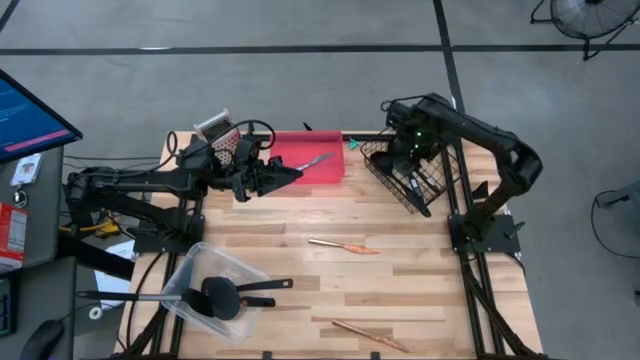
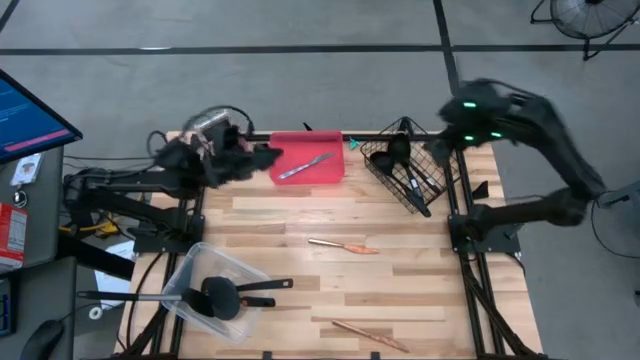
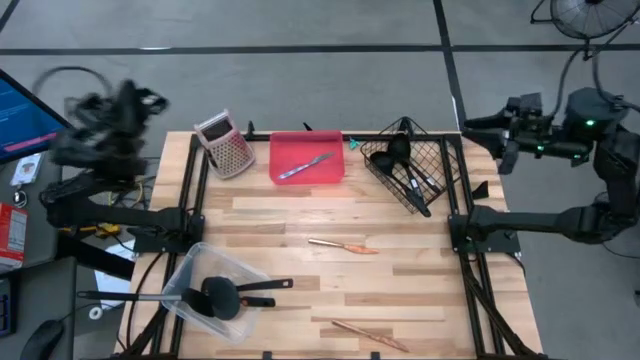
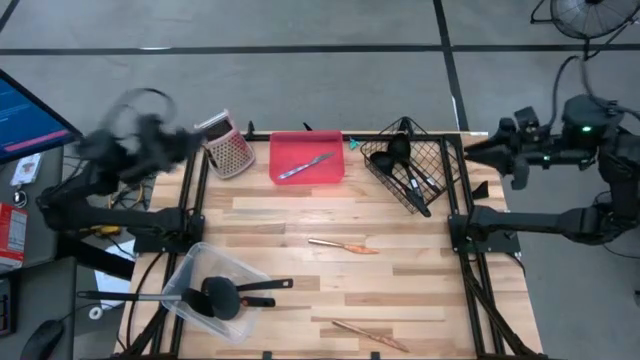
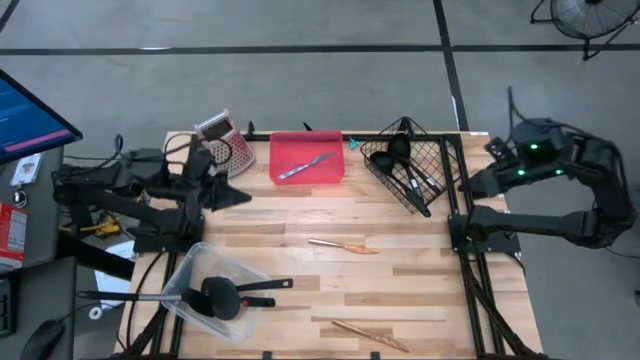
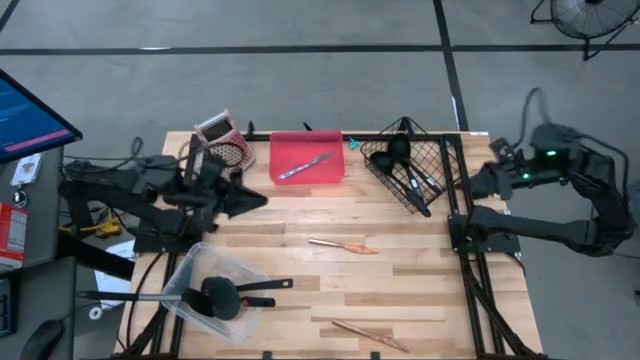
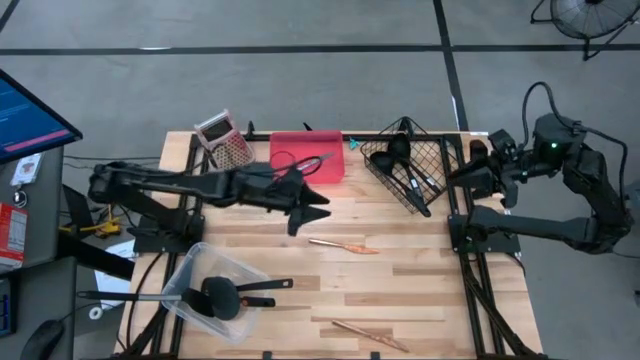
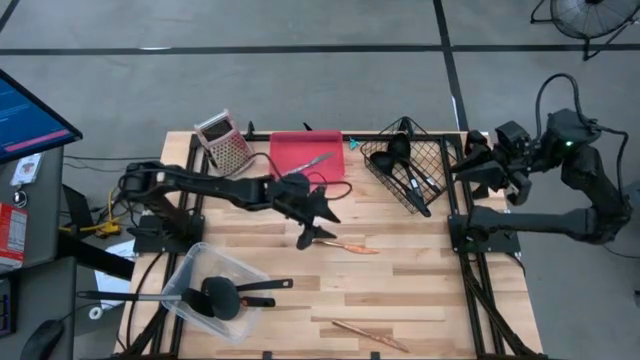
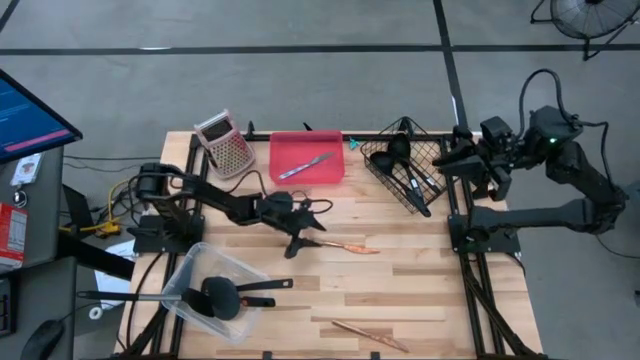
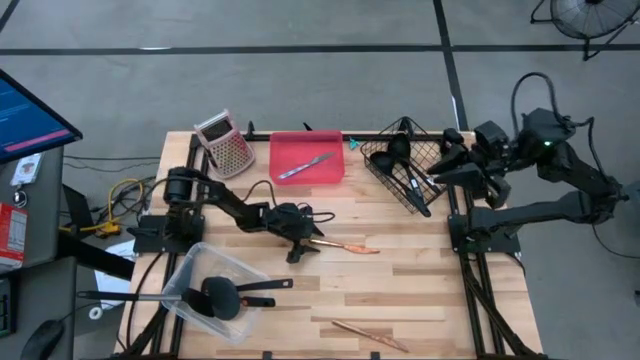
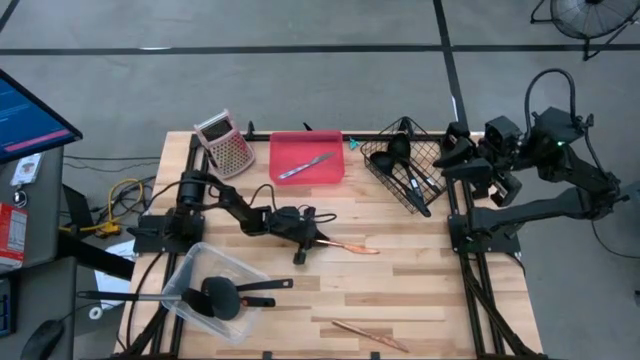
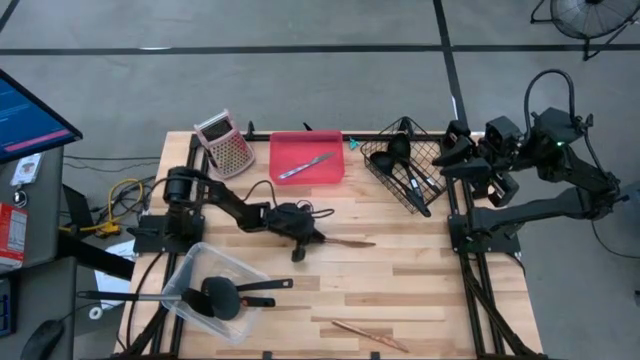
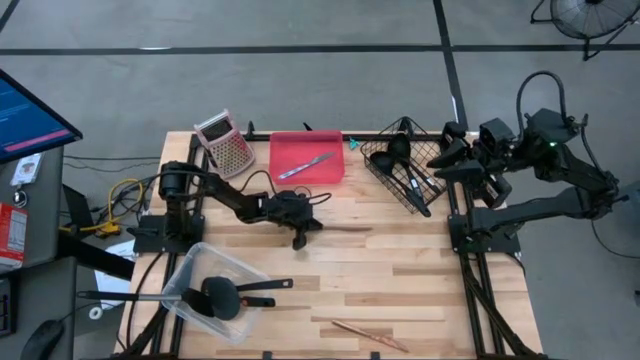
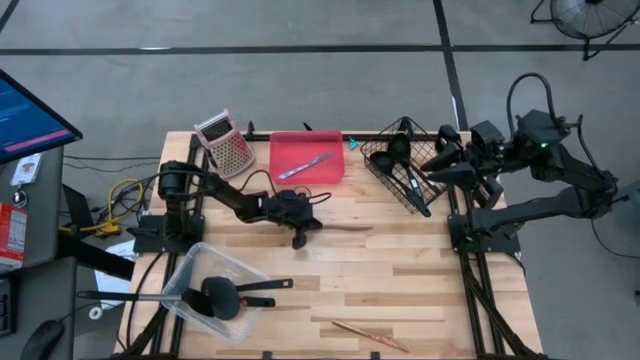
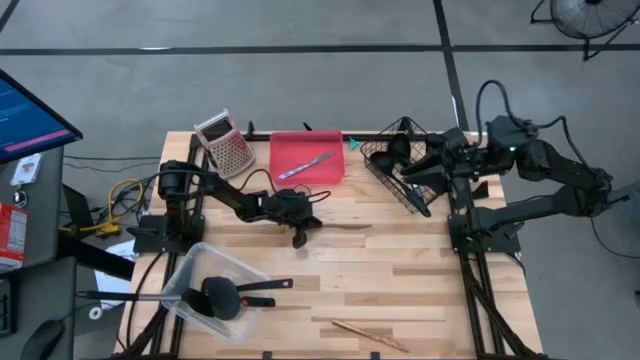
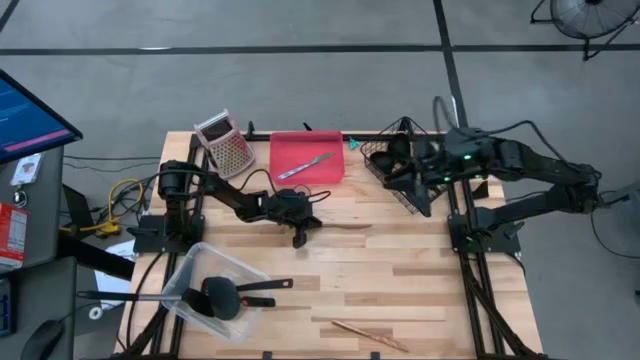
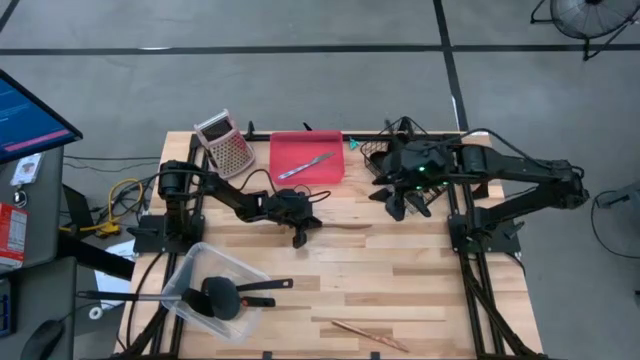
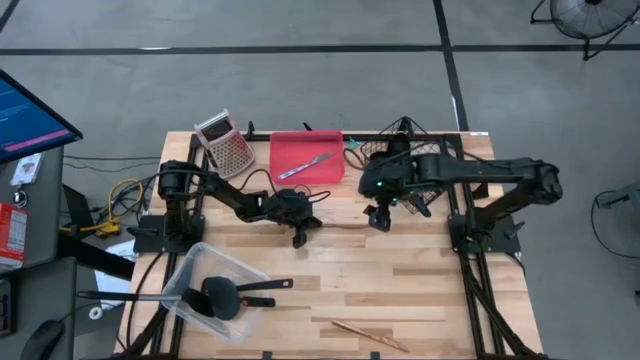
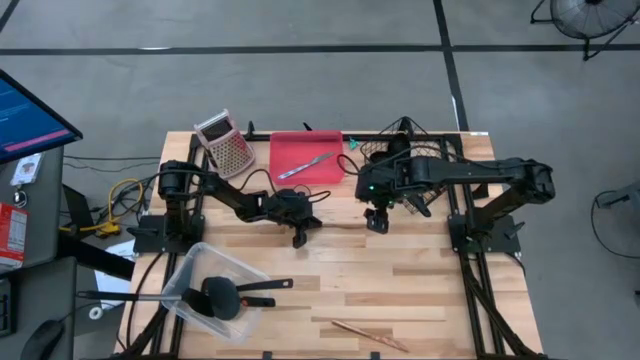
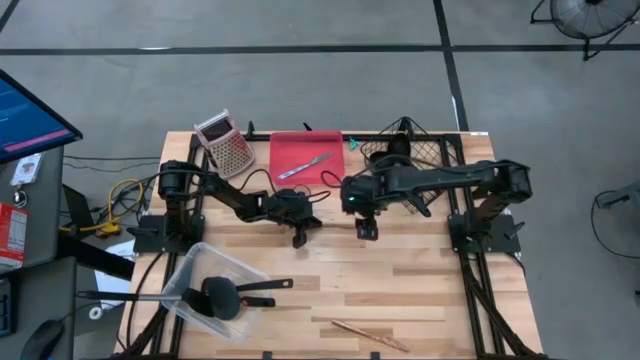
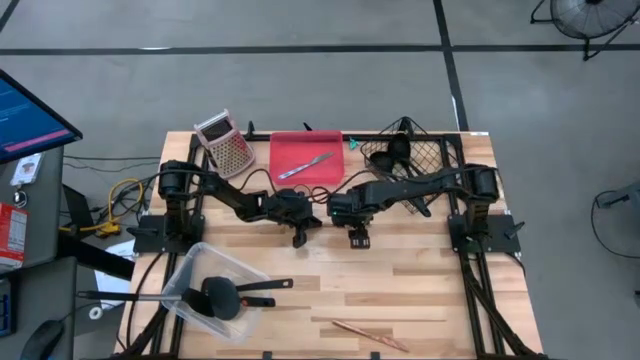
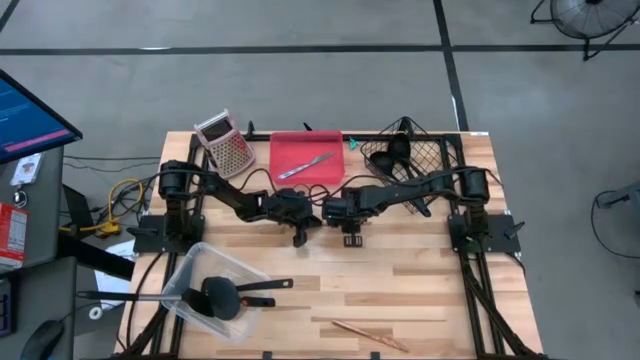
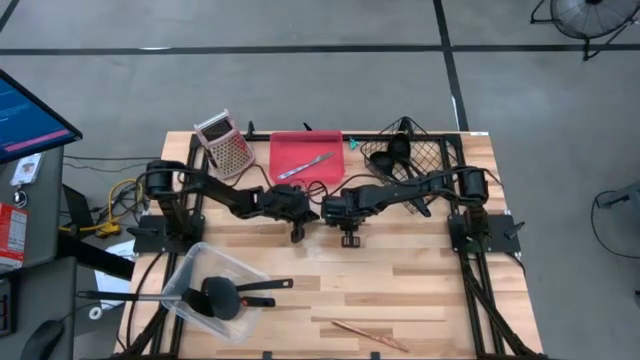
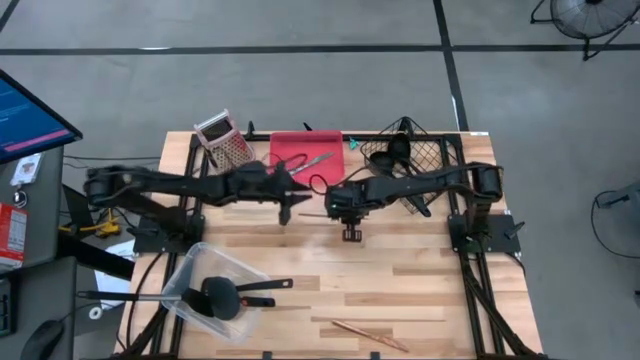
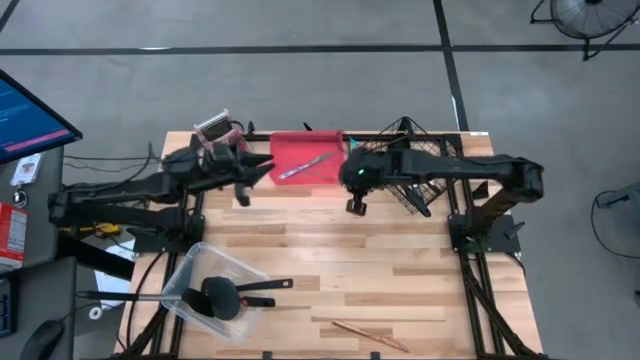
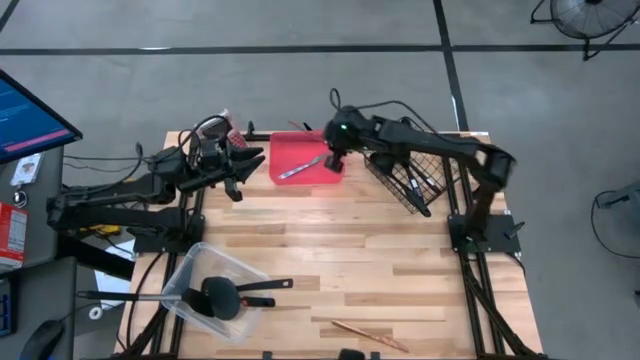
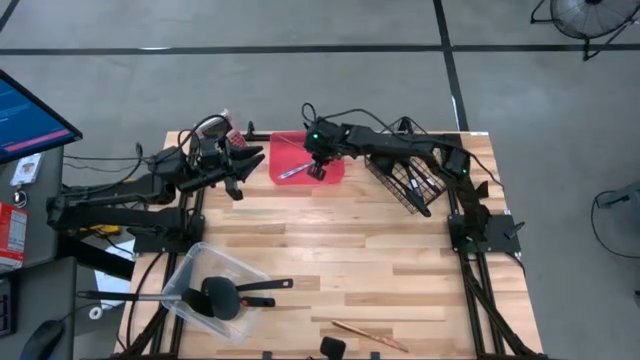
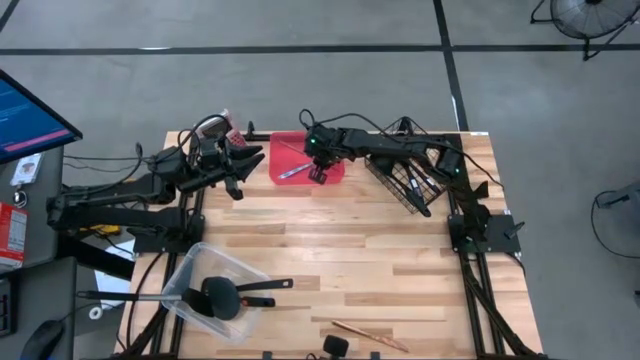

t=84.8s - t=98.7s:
Task: Pick & Place Kitchen Items
Put the gold table knife into the pink bin

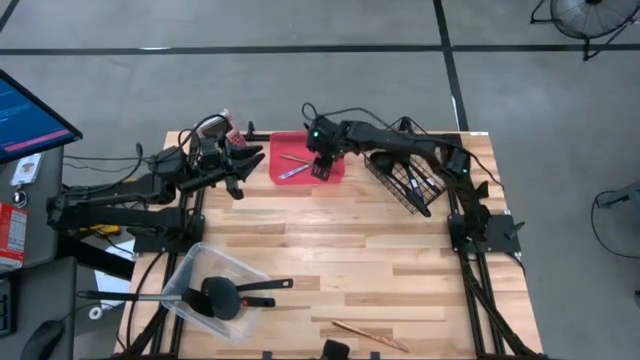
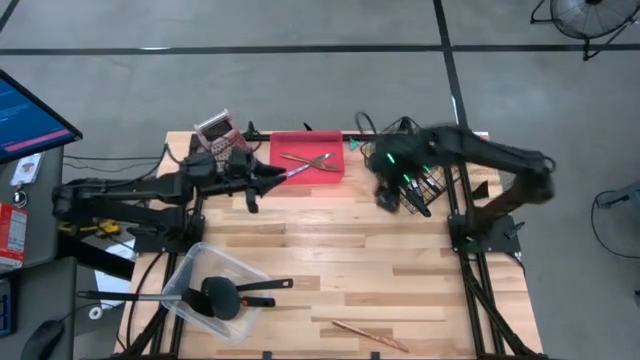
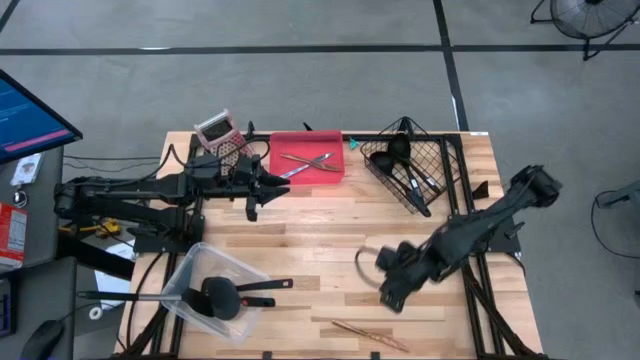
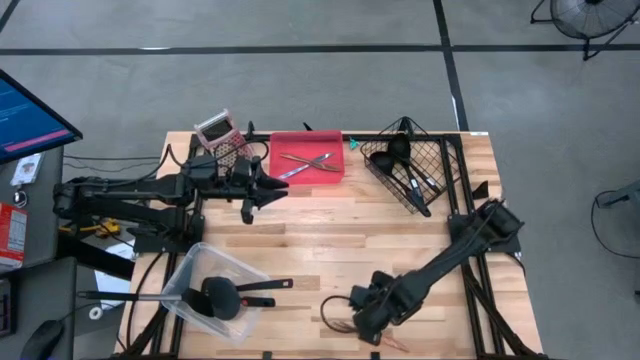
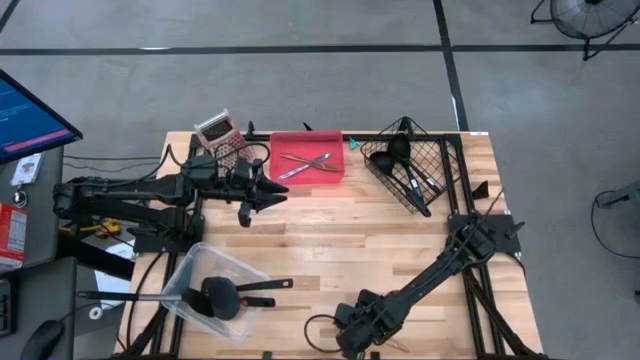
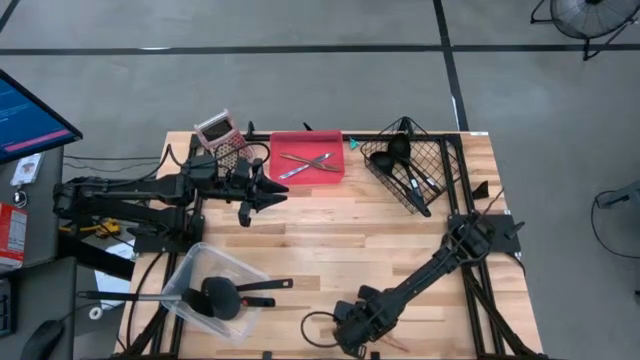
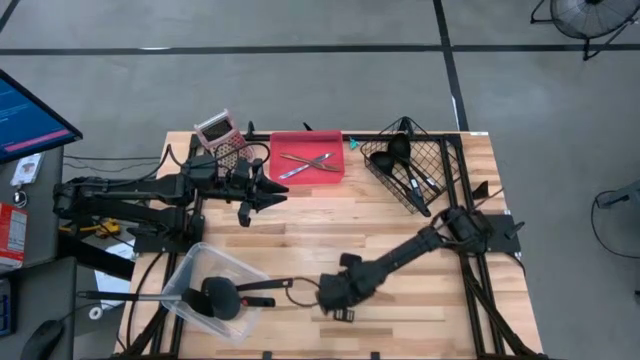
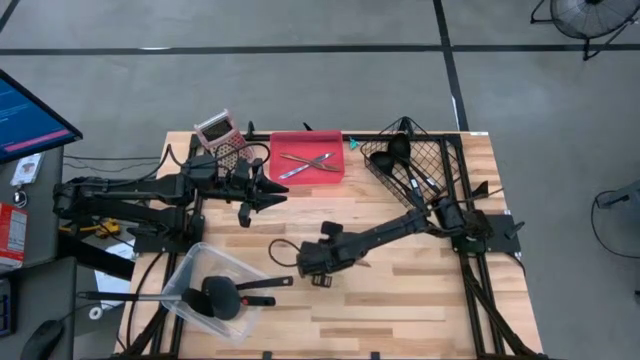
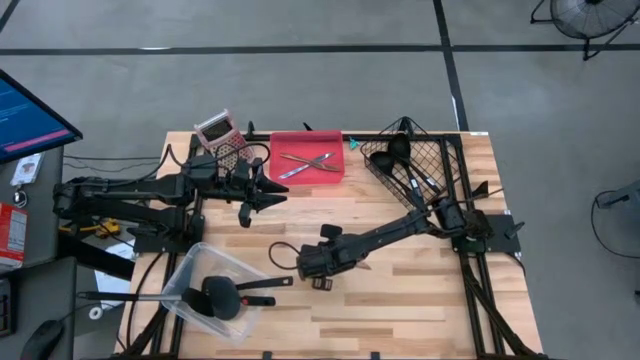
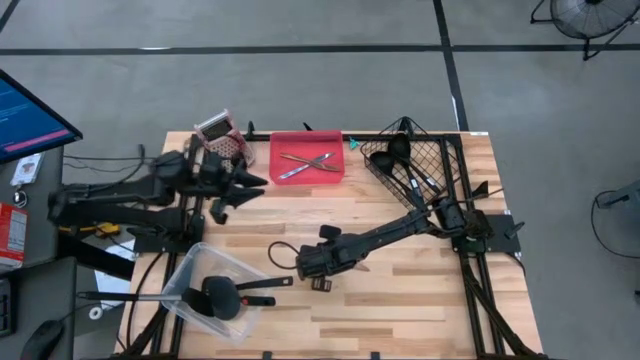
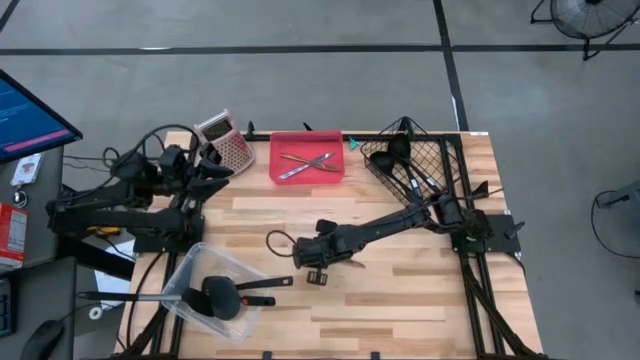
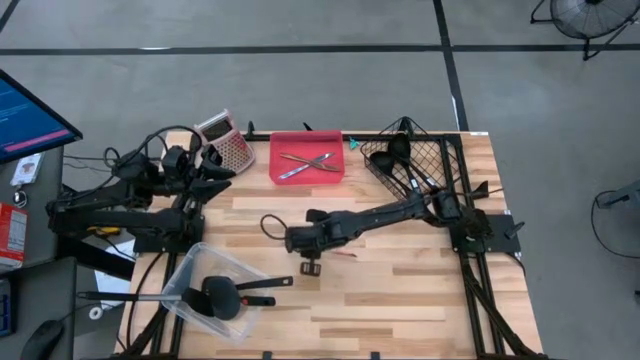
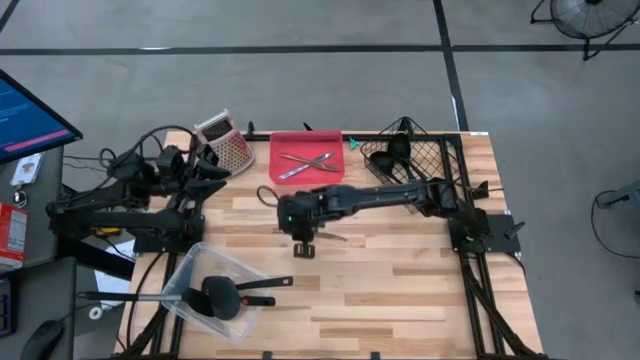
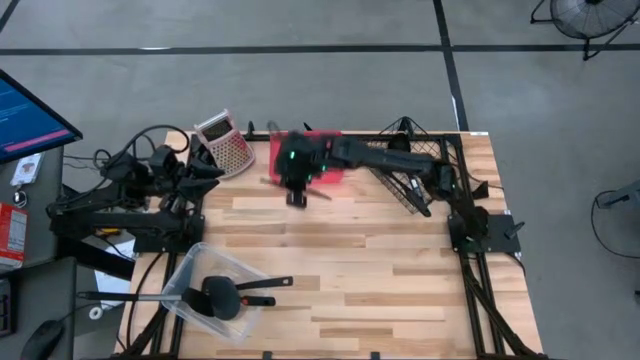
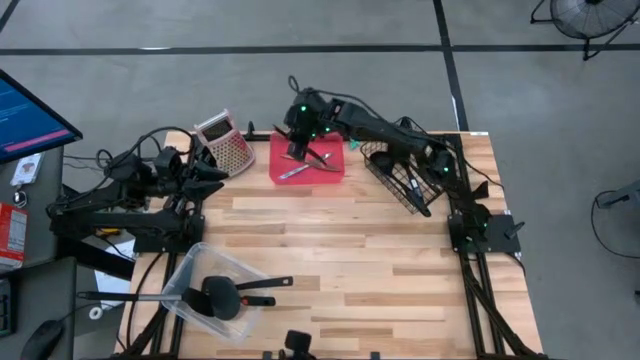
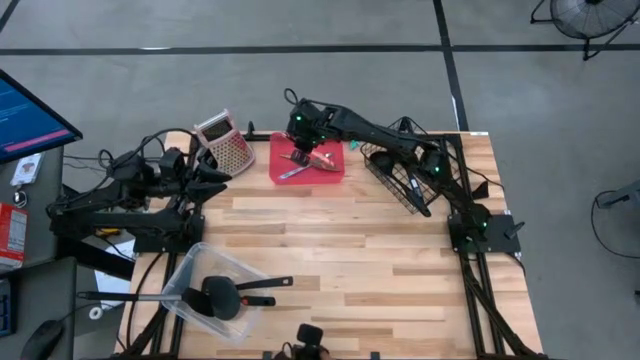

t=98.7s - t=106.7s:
Put the gold table knife into the pink bin
